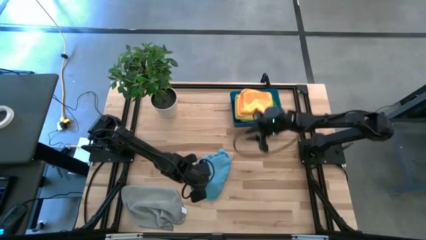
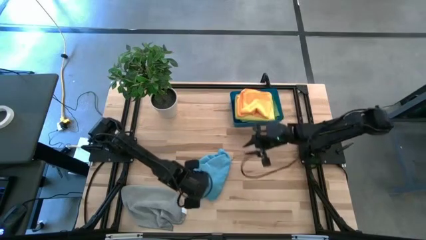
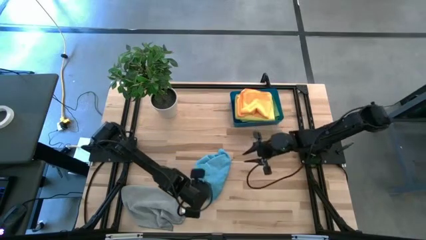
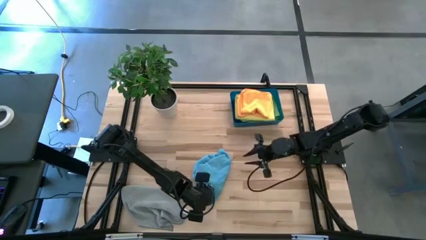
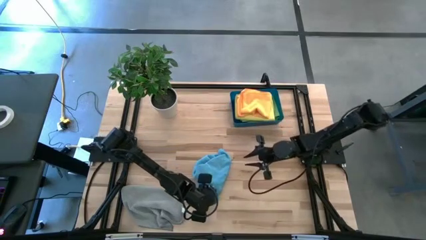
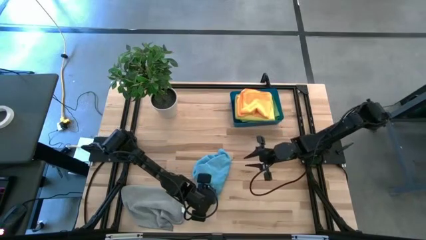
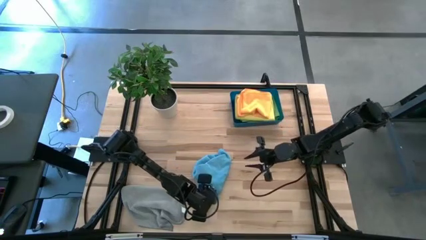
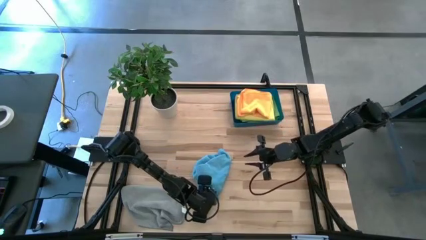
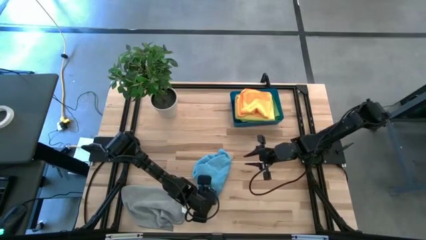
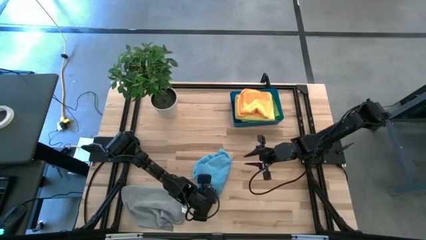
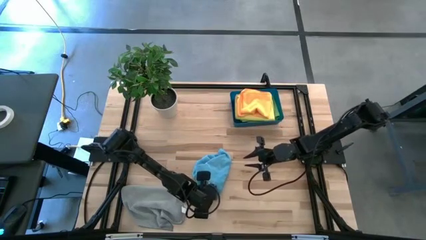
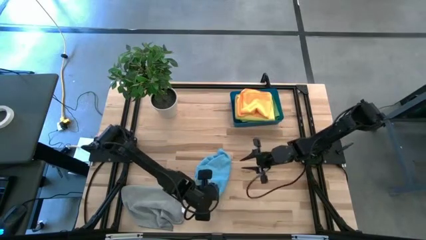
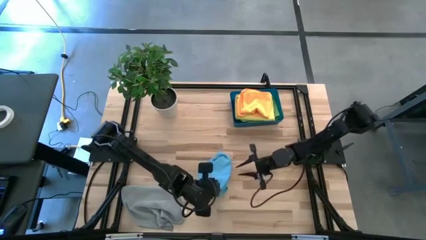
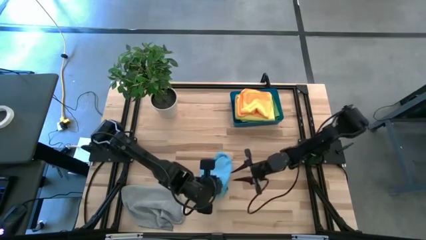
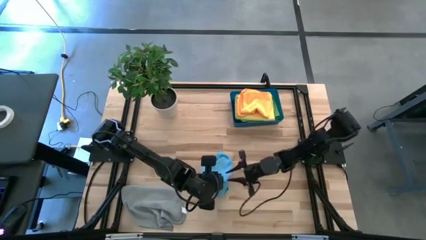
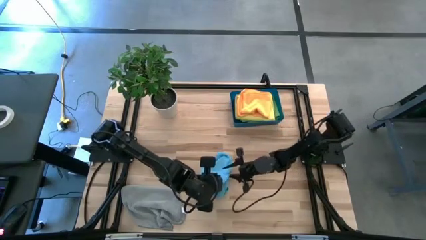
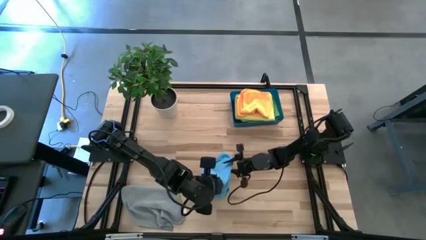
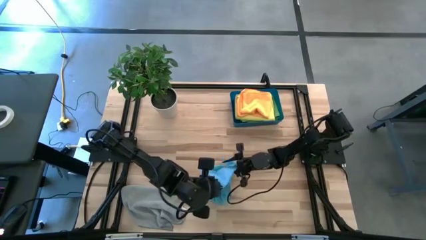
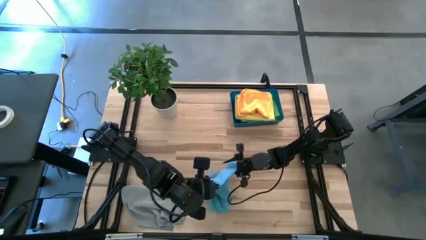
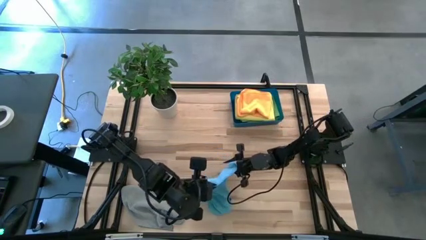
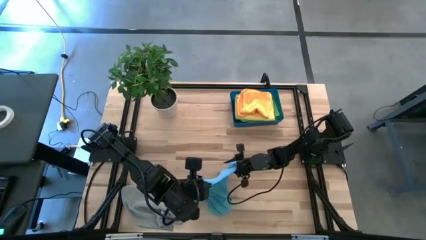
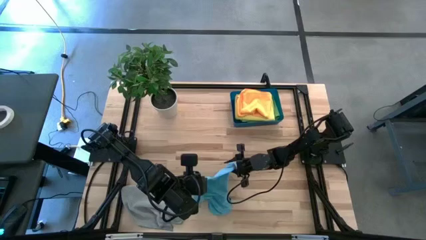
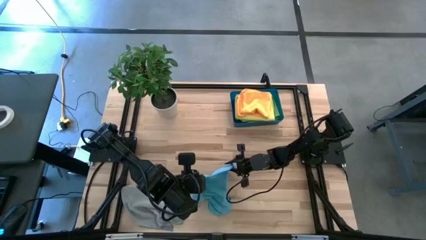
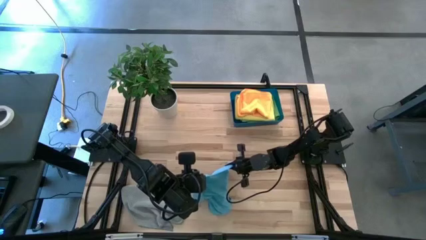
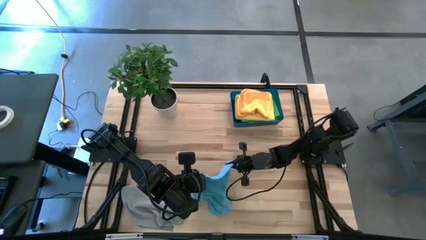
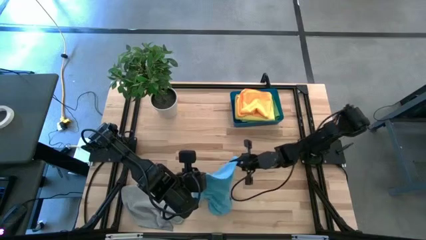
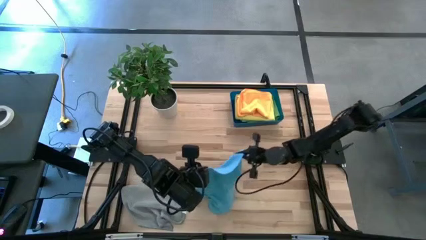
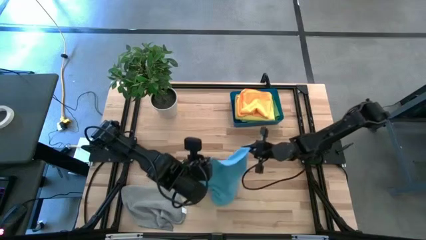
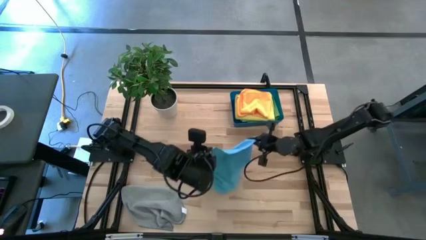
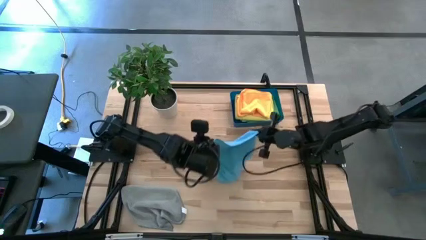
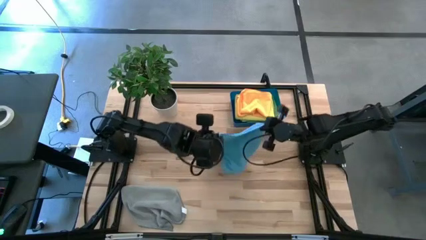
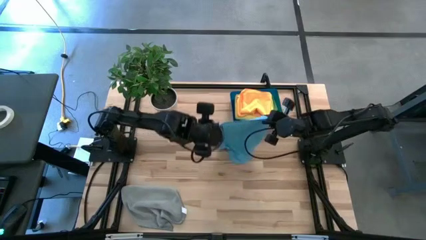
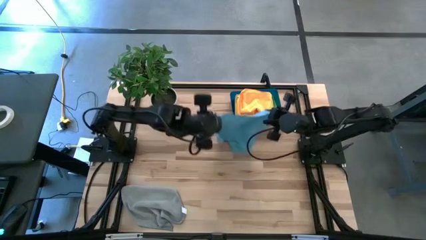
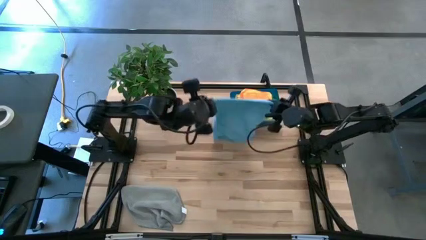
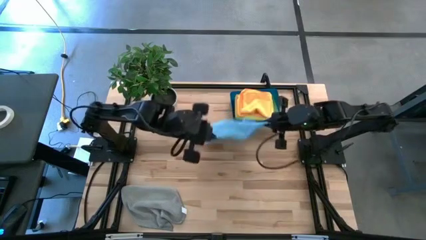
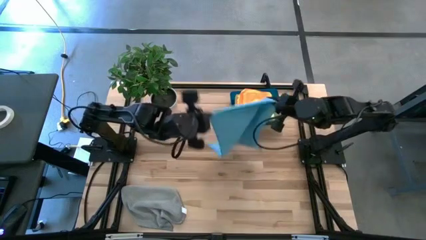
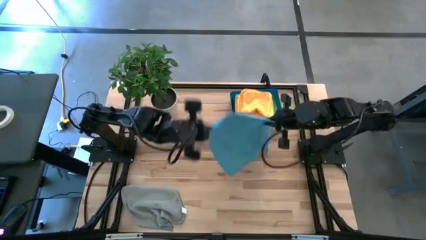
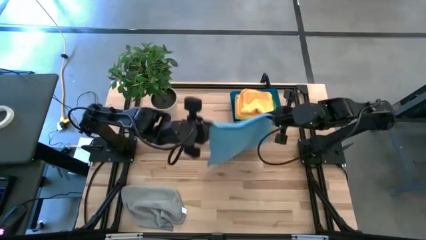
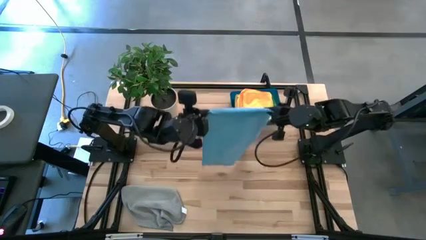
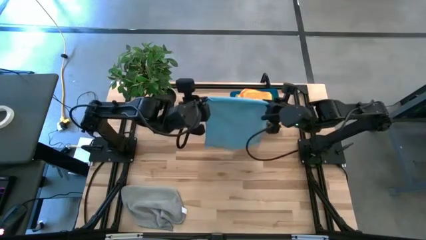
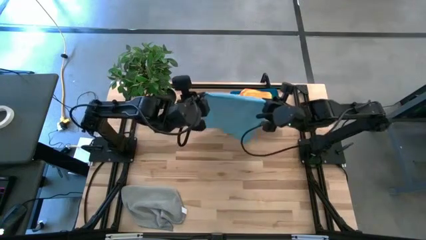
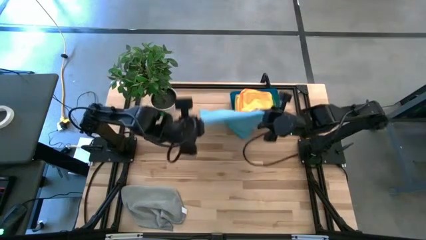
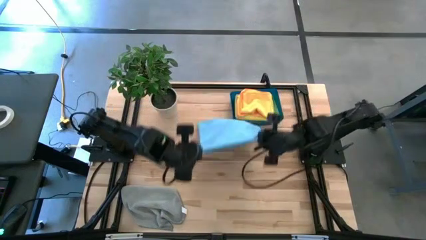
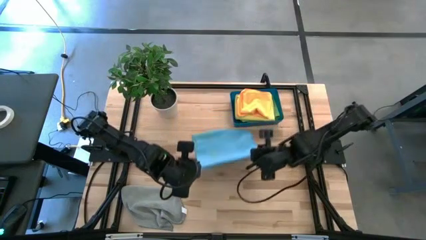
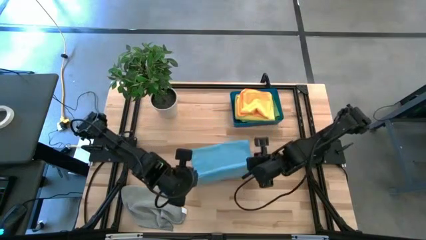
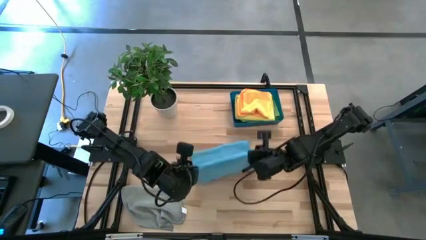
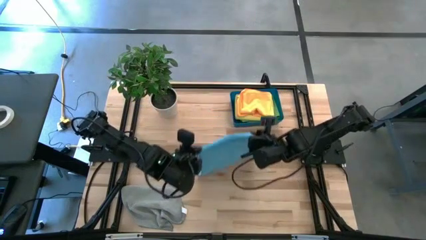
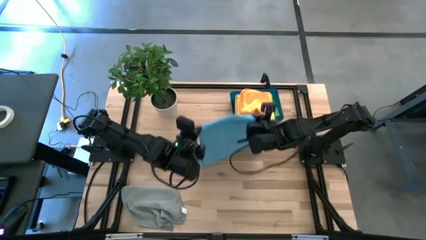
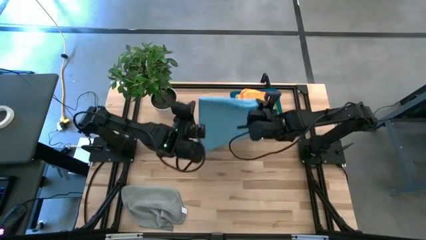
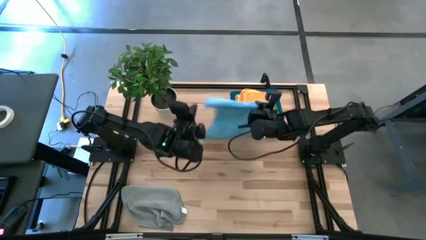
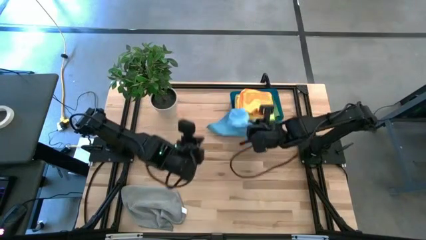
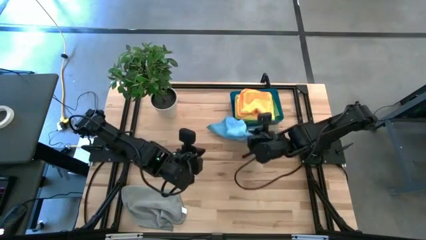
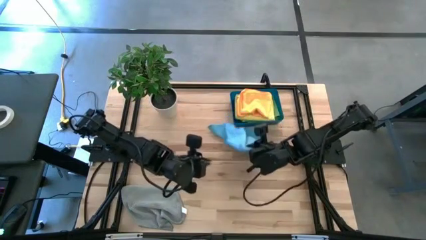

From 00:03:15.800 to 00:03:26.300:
Task: Fold microfiber towels
Fold the blue microfiber cloth

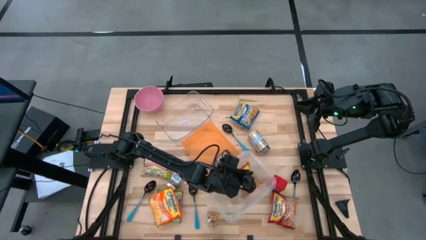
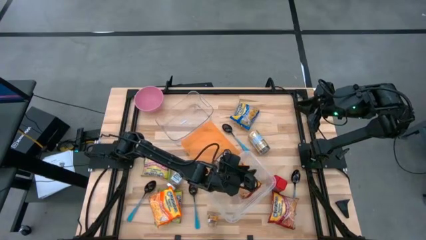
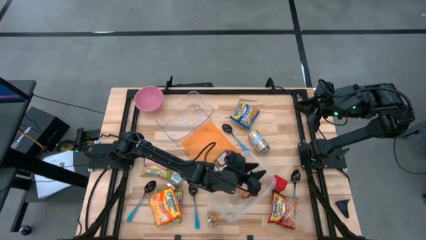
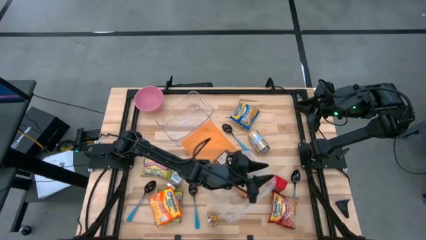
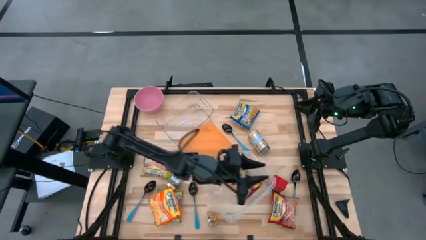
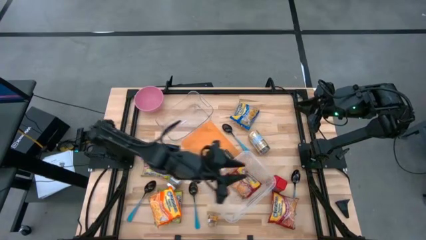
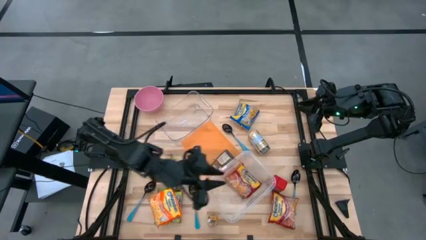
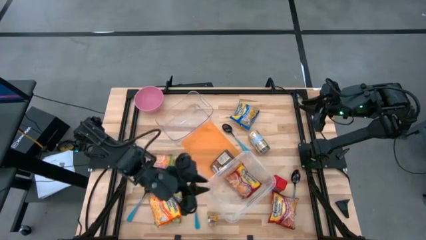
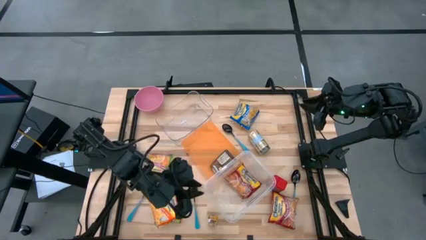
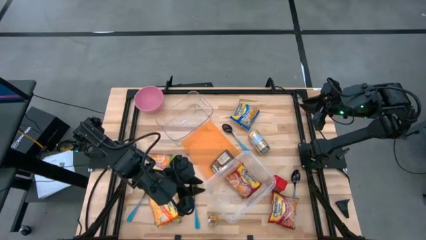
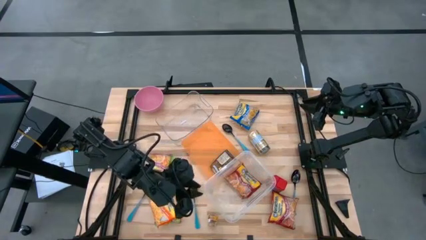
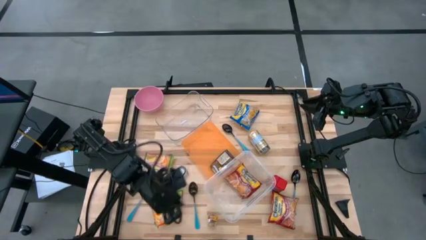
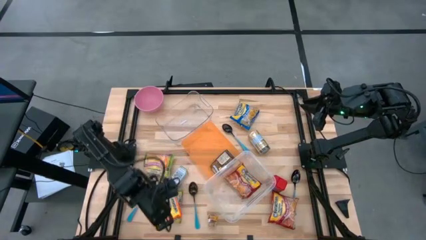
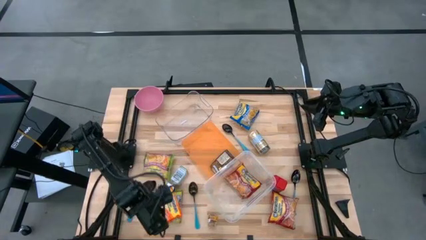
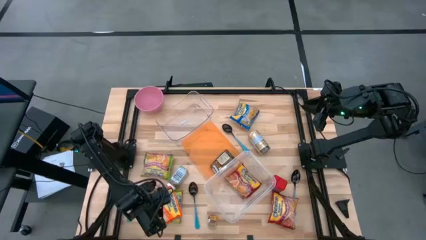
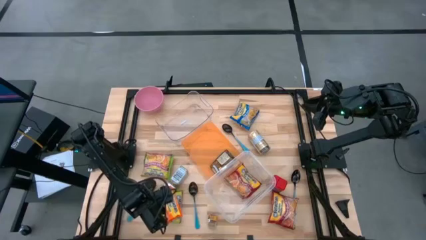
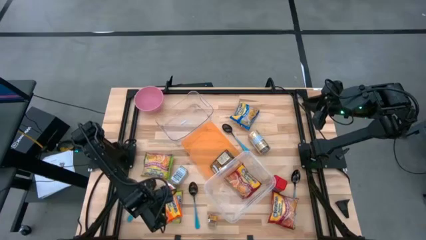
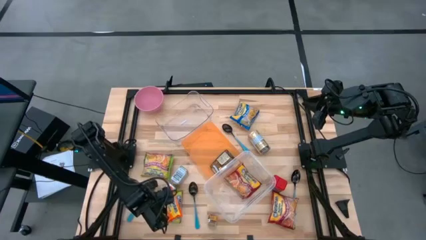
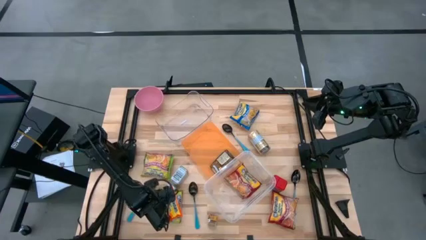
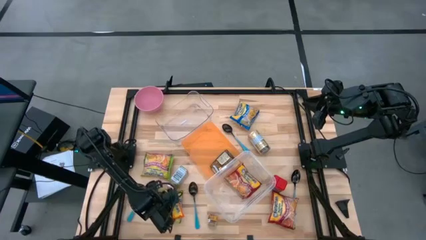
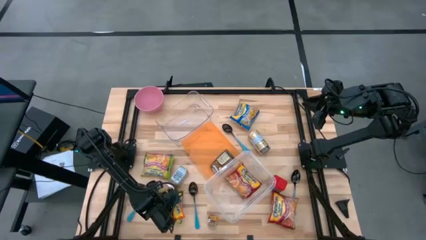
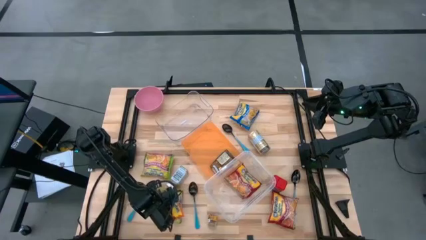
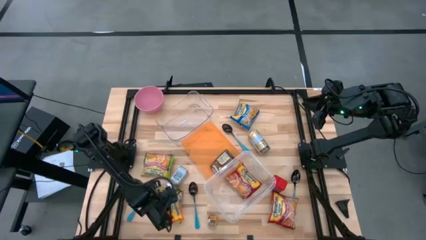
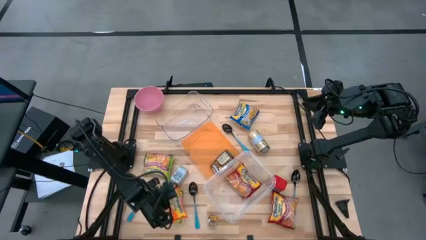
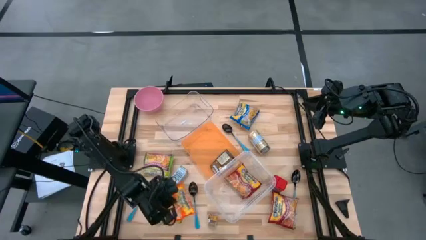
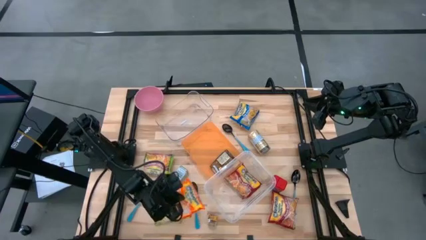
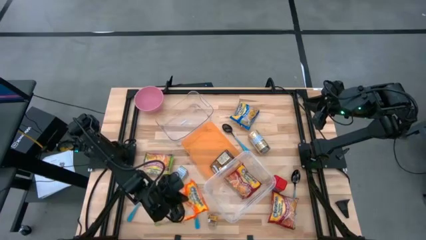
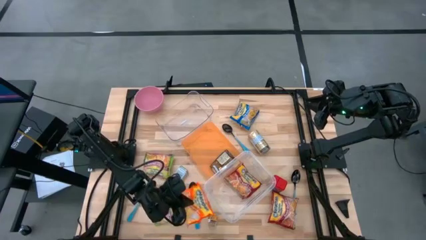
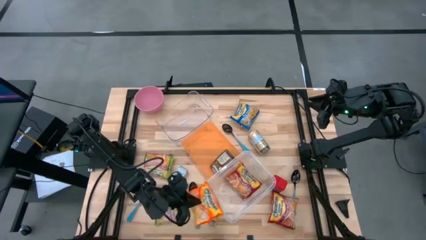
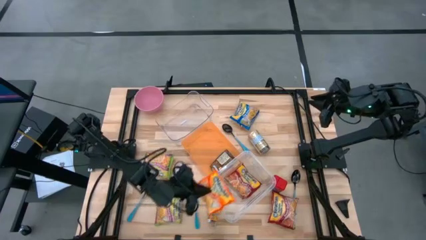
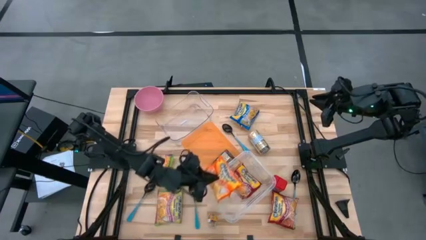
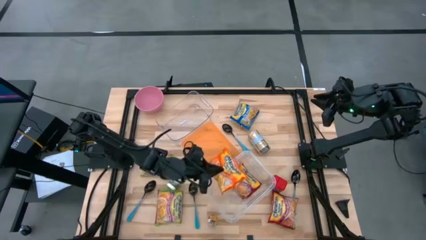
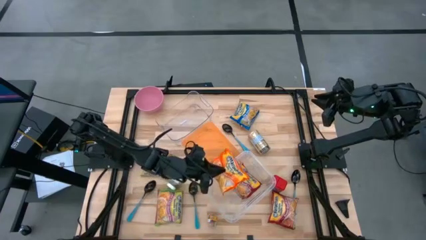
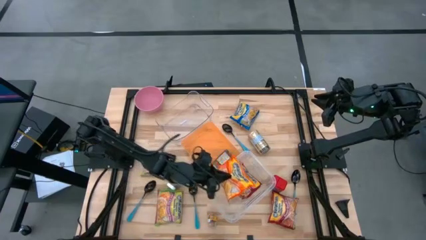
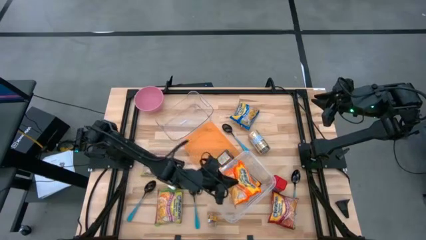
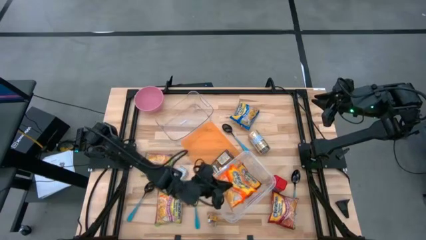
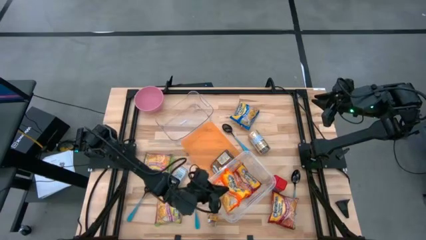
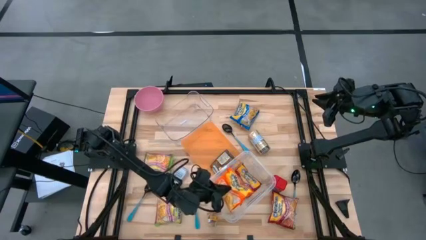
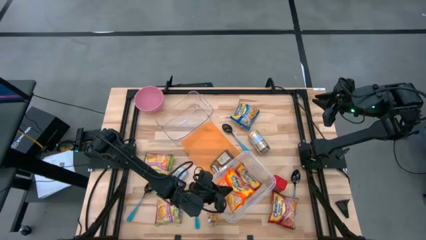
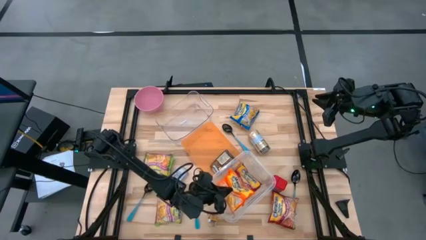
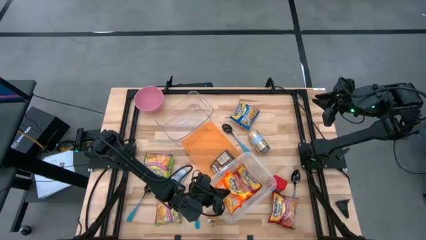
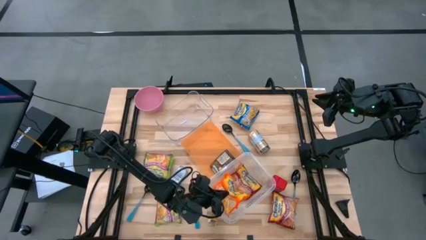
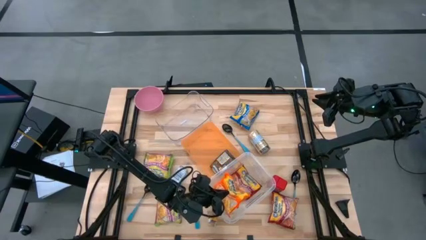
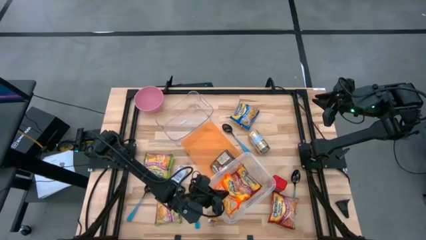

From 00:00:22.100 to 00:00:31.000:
Task: Pick & Place Food Item
Put the orange noodle pack into the bottom transparent bin
